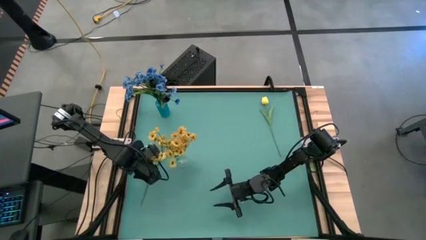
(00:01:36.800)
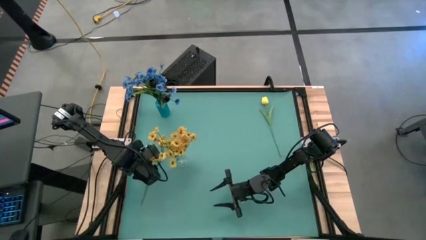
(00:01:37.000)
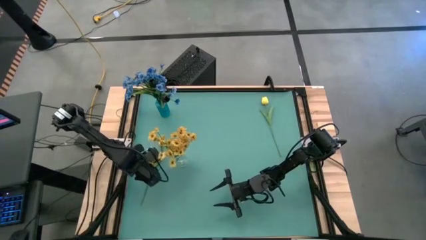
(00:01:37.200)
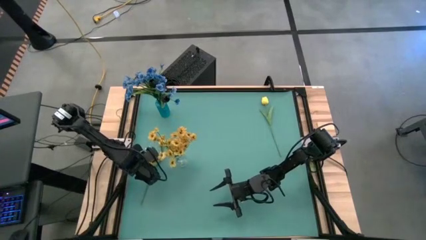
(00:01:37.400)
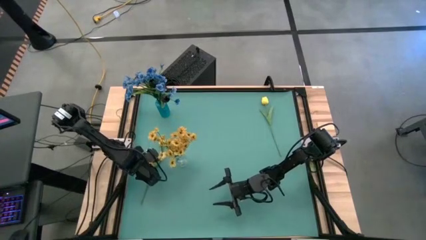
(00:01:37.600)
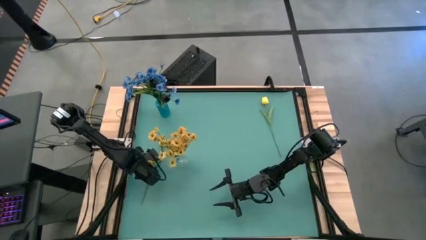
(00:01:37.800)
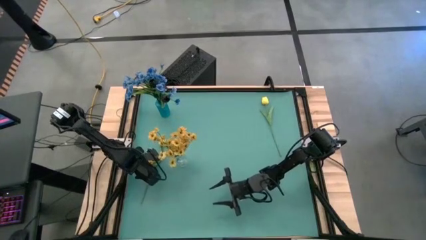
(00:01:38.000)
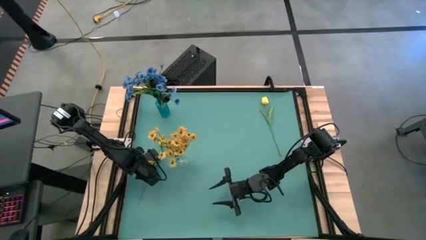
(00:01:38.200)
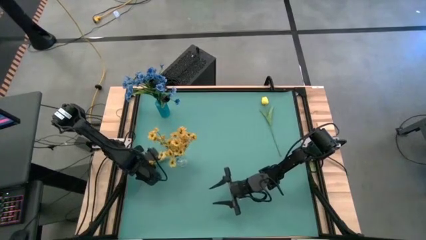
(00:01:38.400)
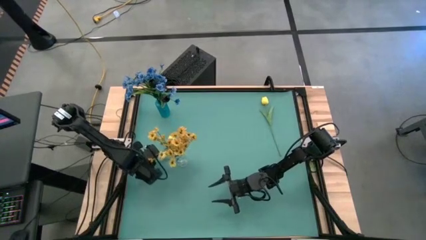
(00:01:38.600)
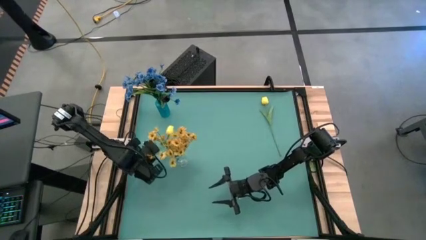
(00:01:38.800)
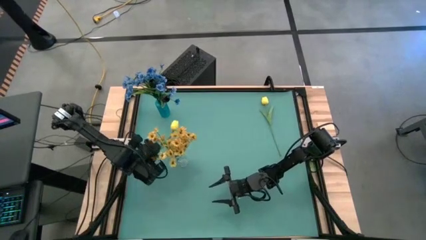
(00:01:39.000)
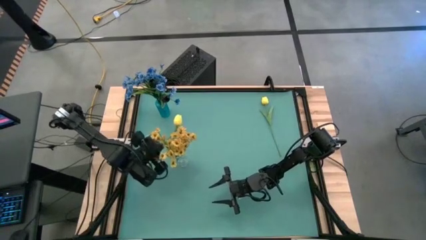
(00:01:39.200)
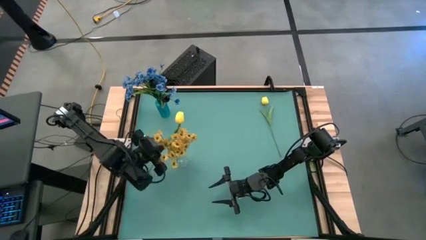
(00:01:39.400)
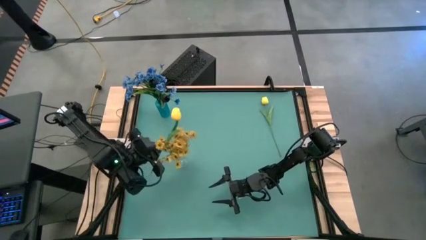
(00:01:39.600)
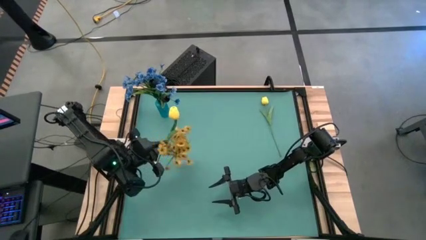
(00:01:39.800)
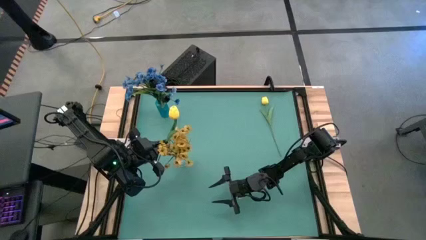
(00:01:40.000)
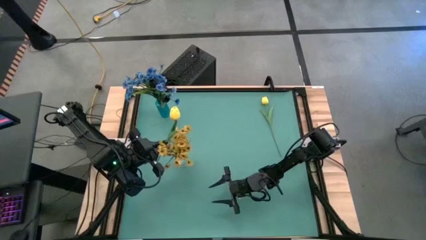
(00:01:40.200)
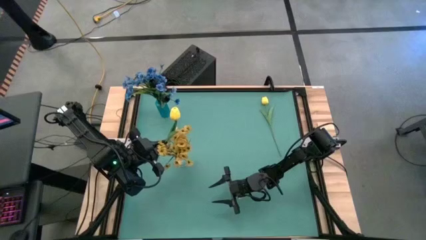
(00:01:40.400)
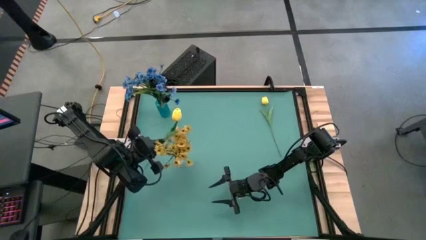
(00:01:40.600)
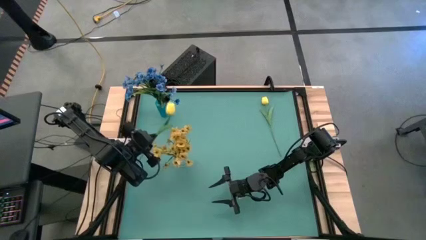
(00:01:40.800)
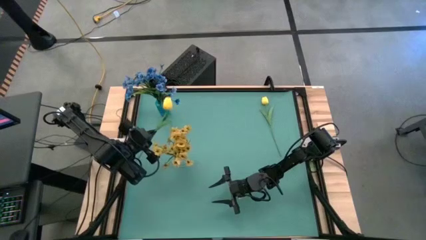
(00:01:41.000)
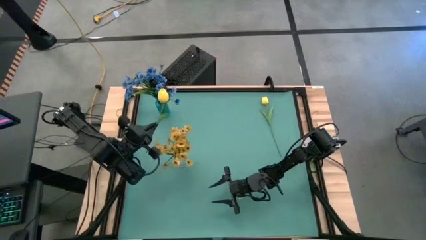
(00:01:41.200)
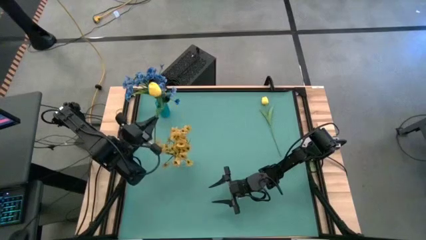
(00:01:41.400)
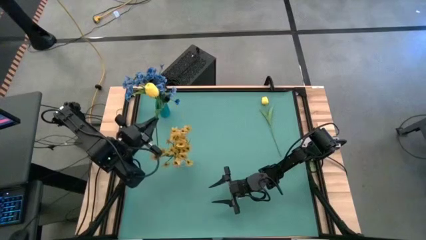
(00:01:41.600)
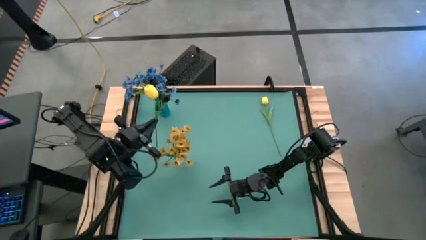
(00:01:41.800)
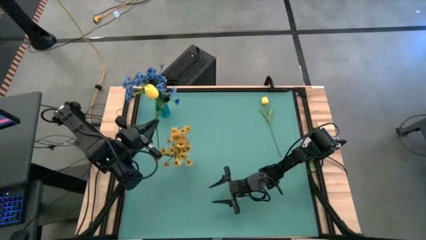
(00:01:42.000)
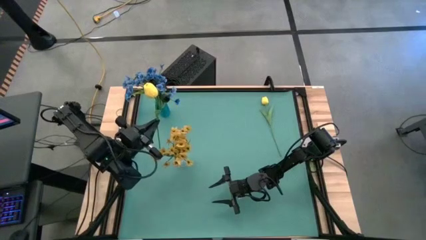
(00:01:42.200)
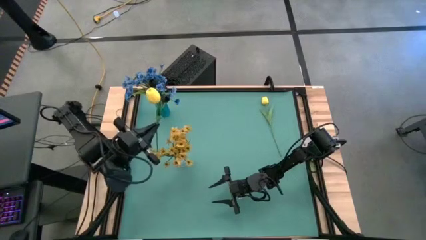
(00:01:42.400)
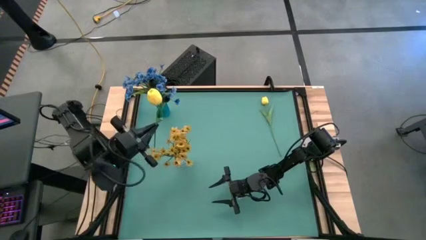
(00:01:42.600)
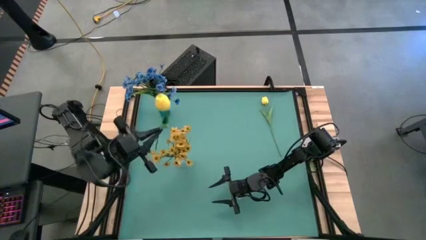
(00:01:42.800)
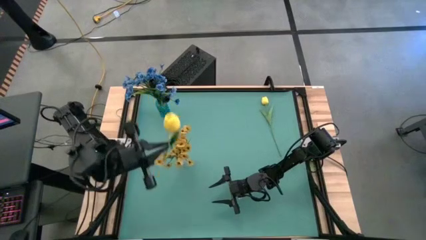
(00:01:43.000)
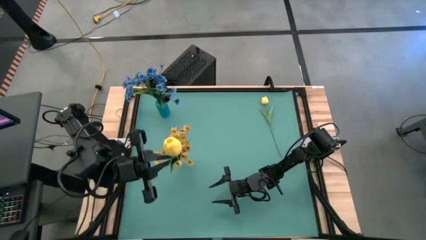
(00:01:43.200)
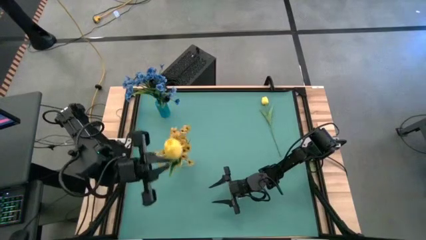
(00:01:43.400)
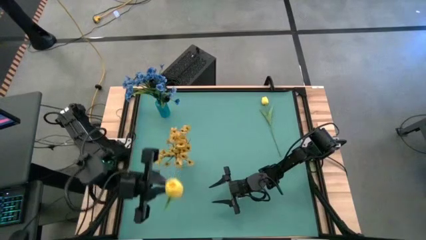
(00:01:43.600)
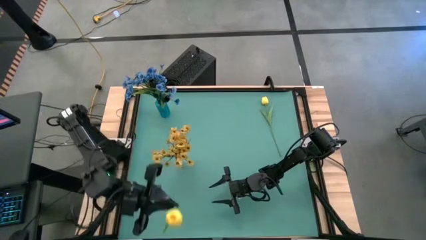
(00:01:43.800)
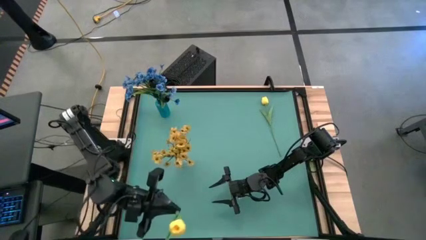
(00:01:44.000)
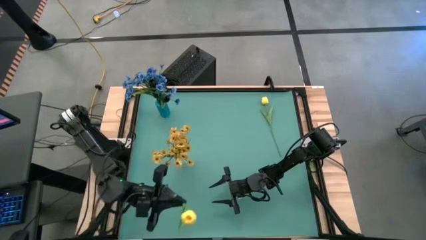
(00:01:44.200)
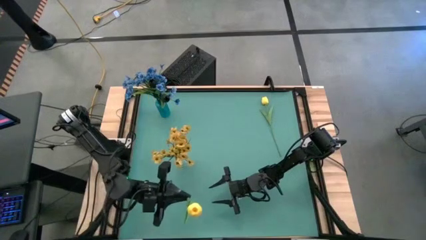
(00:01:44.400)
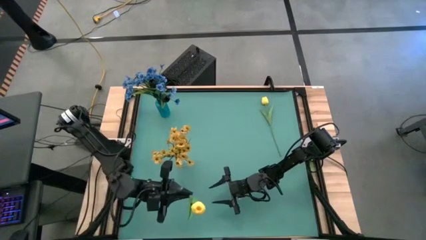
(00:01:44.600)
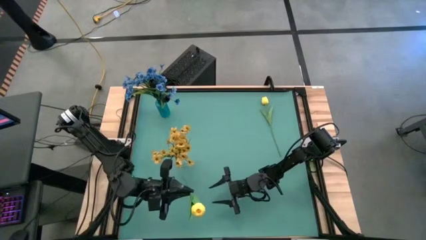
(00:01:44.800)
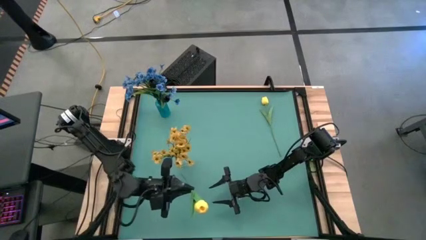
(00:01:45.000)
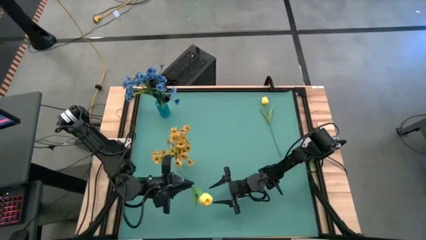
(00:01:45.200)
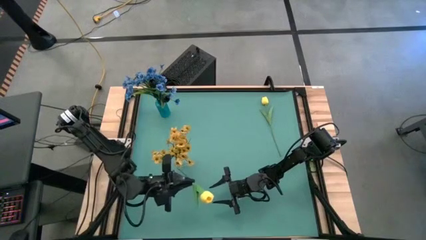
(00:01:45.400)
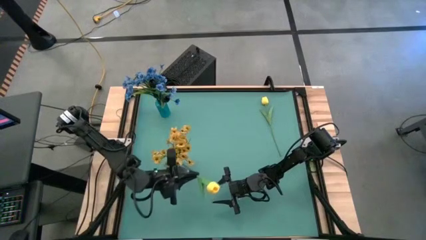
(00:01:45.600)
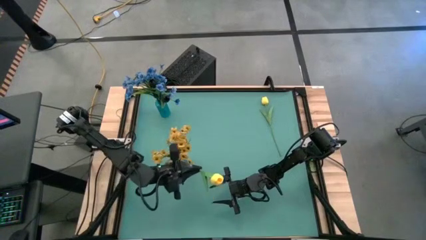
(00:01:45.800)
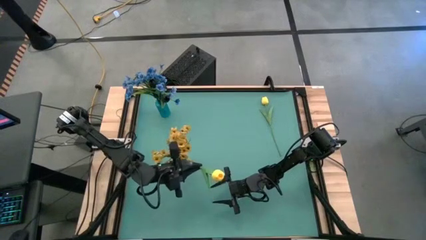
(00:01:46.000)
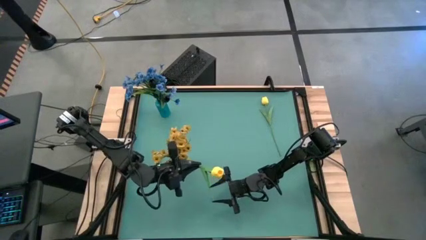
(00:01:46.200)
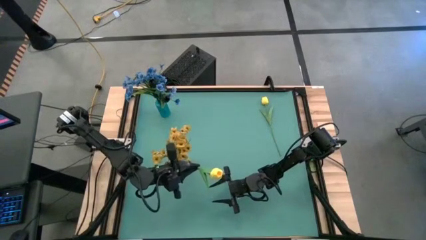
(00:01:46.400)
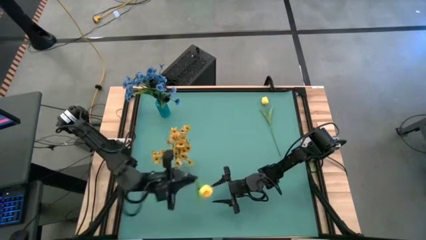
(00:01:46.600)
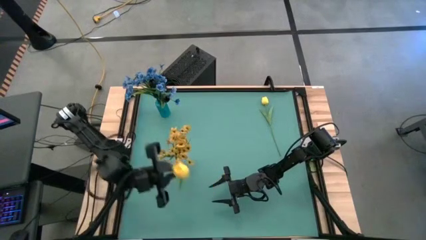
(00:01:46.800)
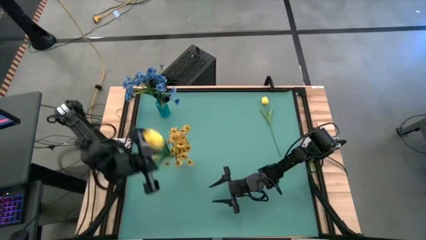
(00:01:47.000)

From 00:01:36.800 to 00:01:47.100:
Task: Sort flowers into vase by color
Put the left yellow flower into the transparent vase
